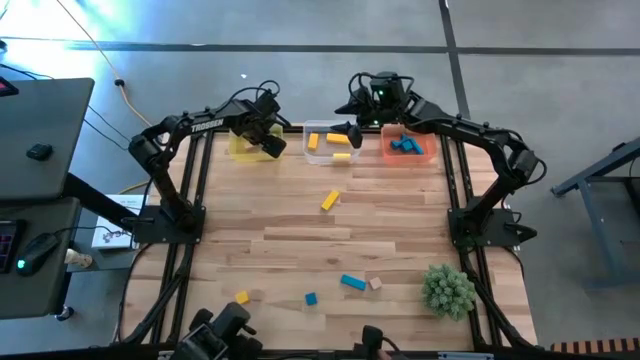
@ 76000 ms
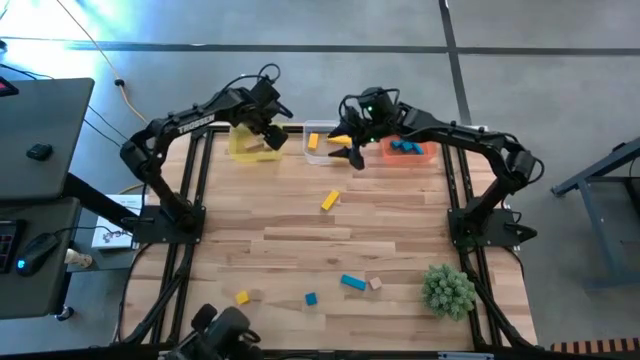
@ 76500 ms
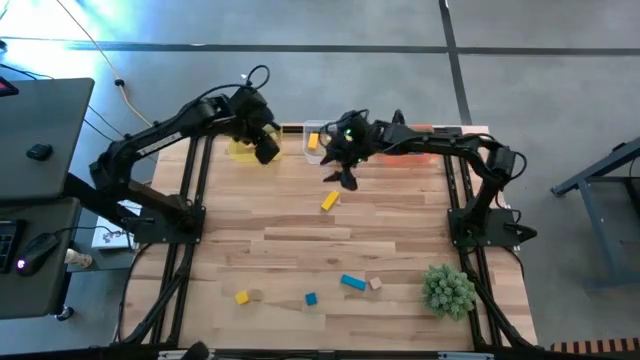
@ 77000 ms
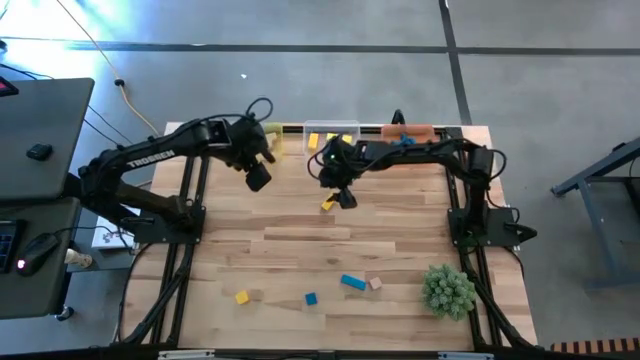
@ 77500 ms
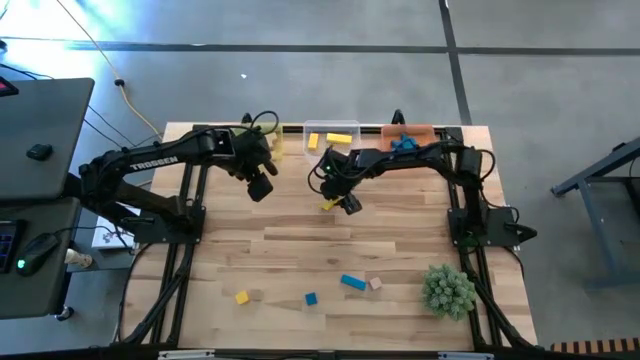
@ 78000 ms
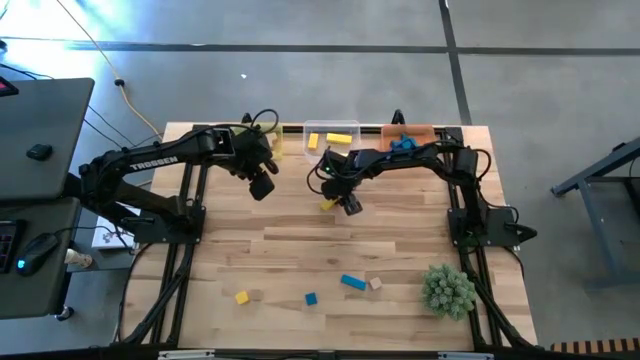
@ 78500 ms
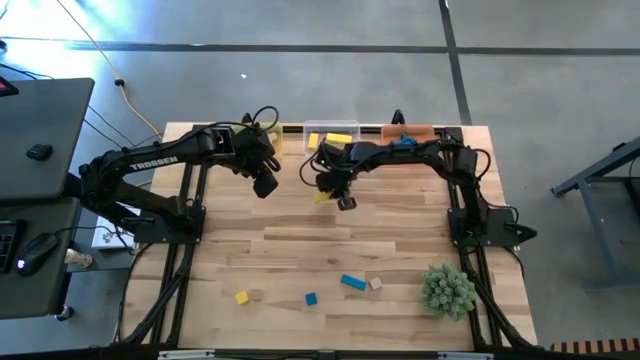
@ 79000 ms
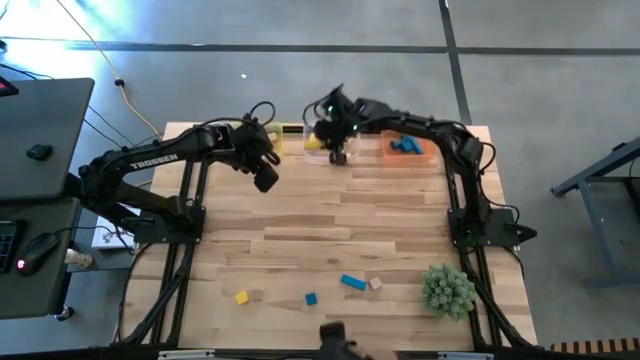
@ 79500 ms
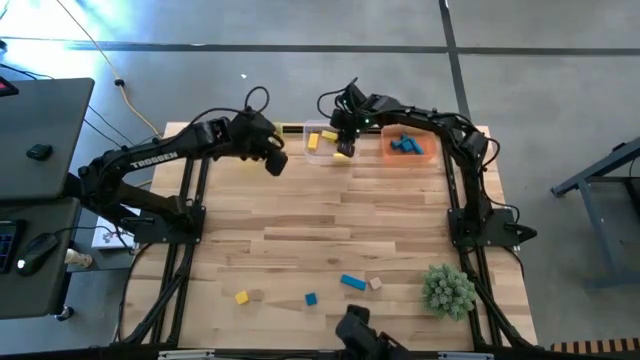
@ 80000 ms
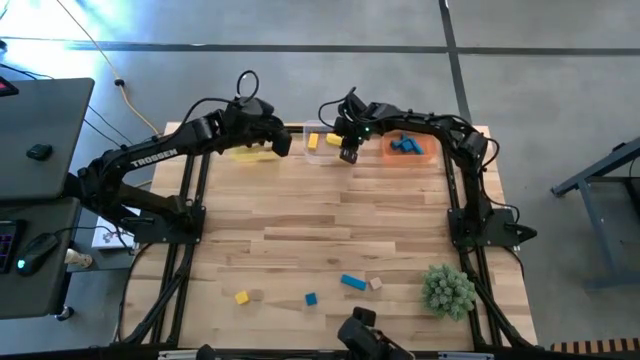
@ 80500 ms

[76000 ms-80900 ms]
Task: Sort & place blocks by color
Put the top yellow block into the transparent bin

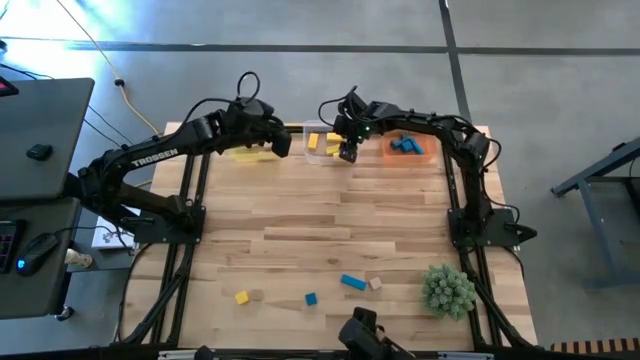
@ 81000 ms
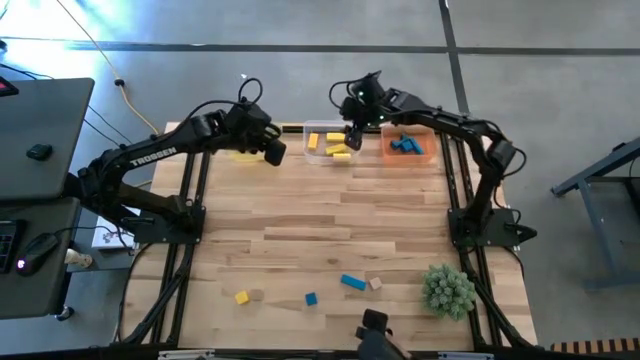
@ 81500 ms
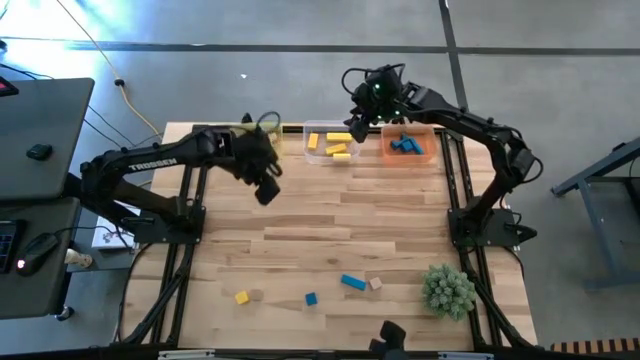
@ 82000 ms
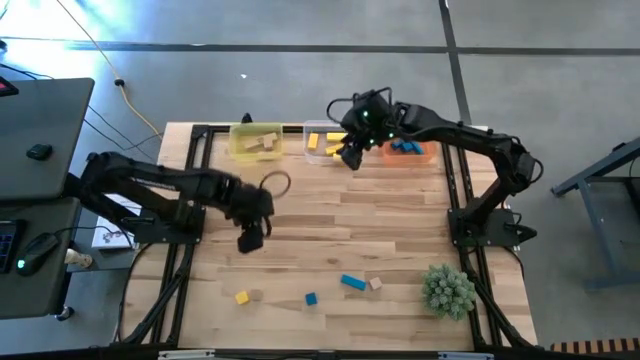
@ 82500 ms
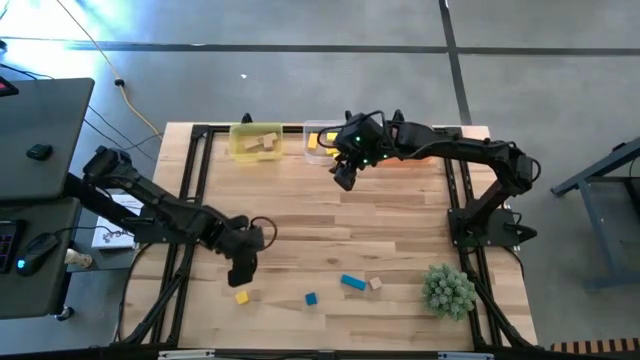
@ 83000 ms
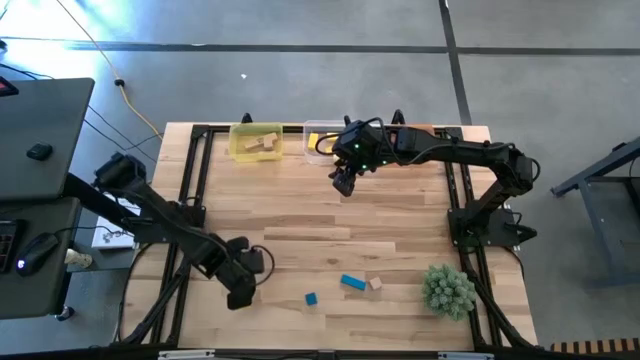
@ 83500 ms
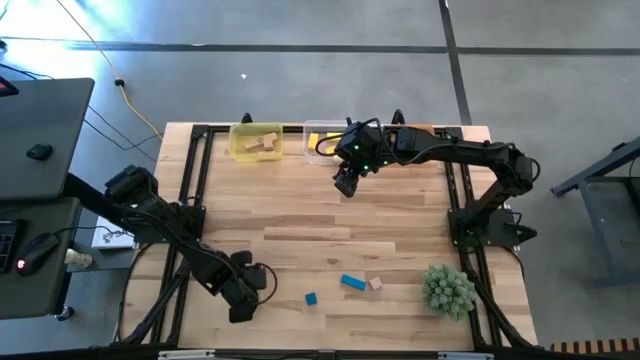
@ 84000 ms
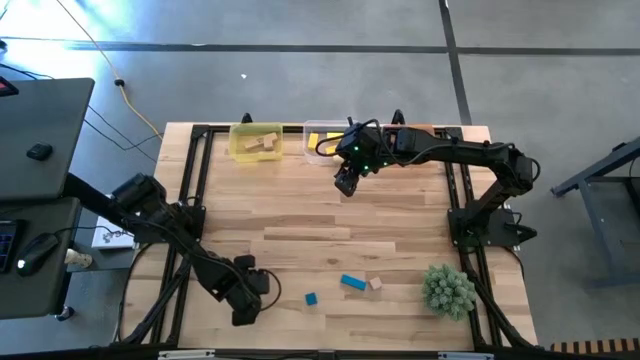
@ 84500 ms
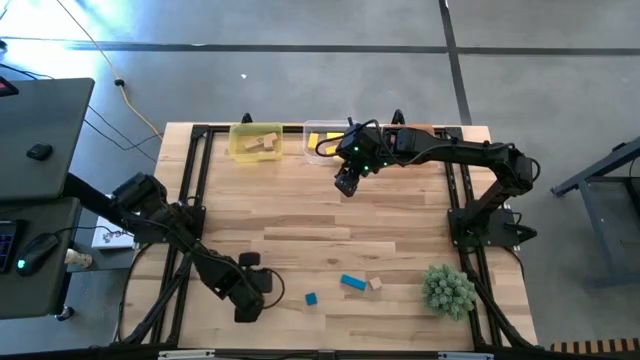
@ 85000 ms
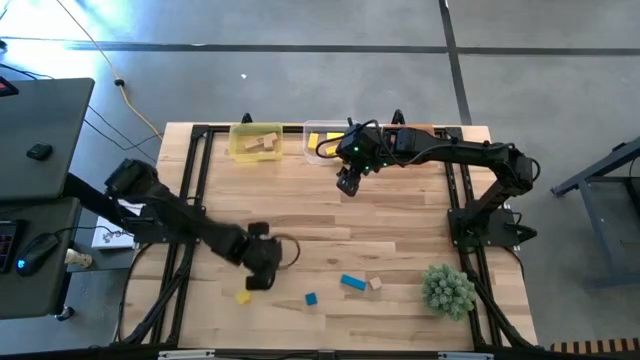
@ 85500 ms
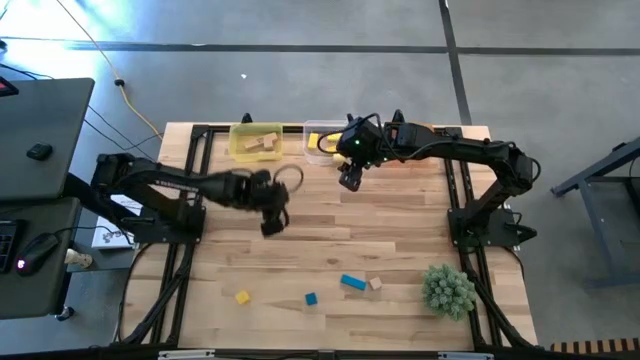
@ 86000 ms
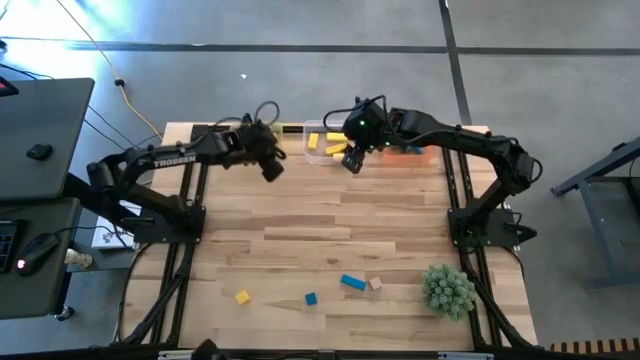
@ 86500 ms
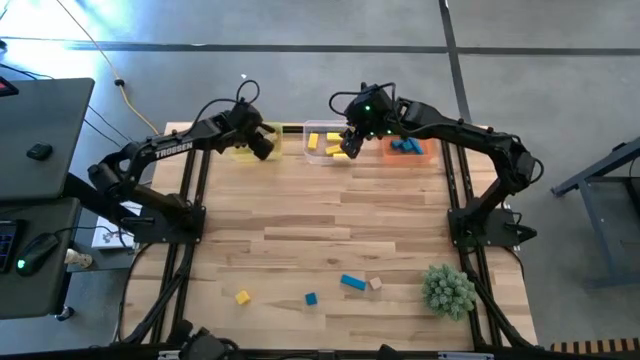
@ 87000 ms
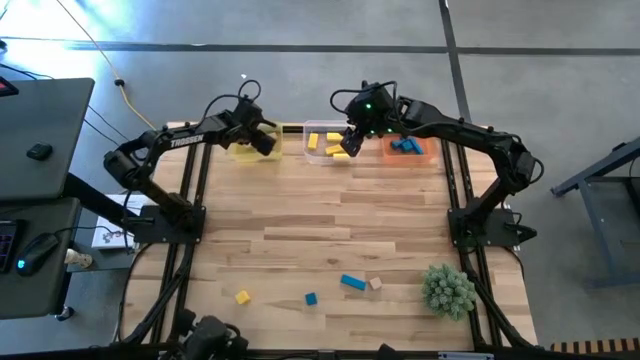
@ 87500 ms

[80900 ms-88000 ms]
Put the left brown block into the yellow bin

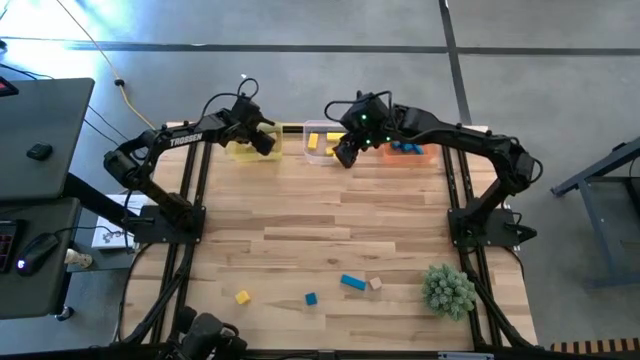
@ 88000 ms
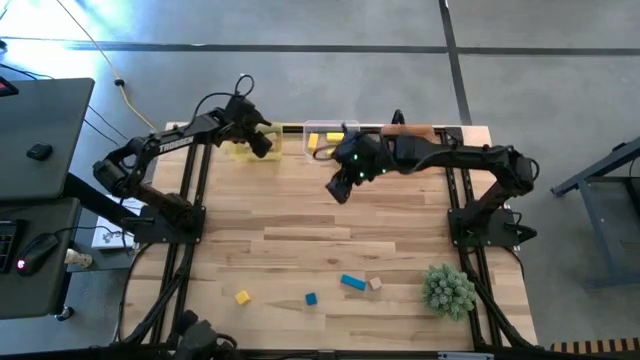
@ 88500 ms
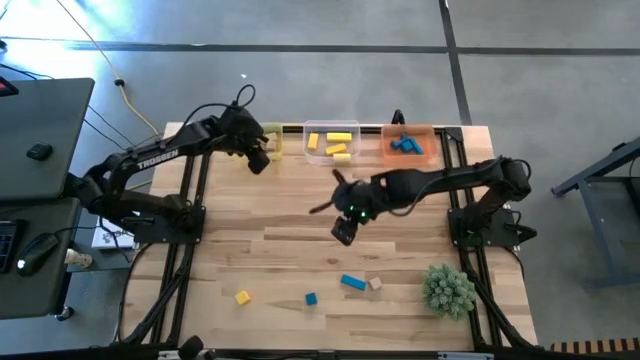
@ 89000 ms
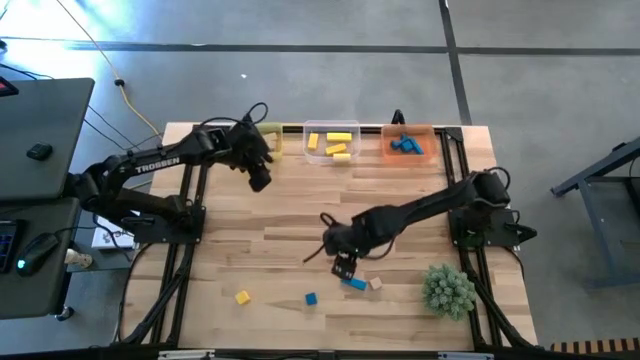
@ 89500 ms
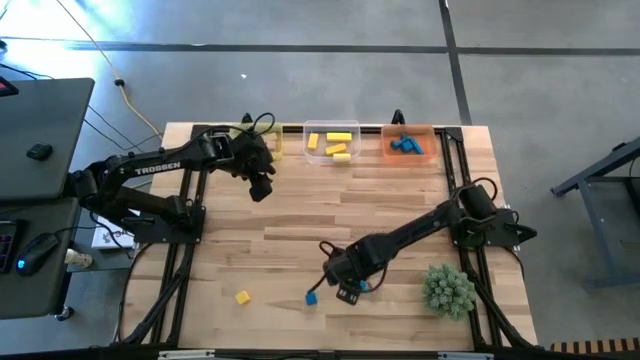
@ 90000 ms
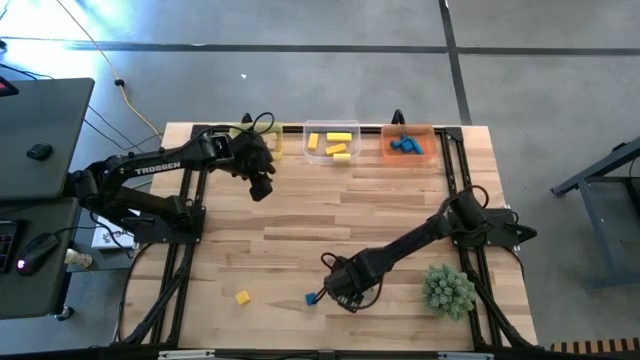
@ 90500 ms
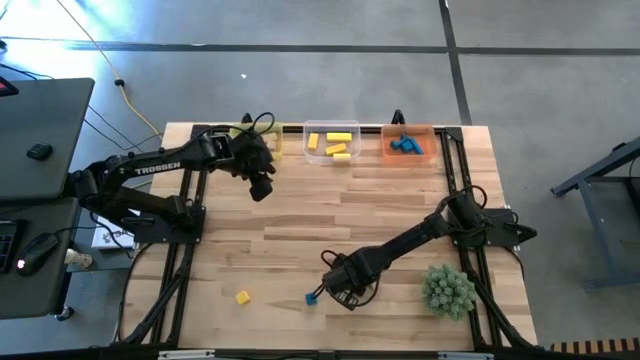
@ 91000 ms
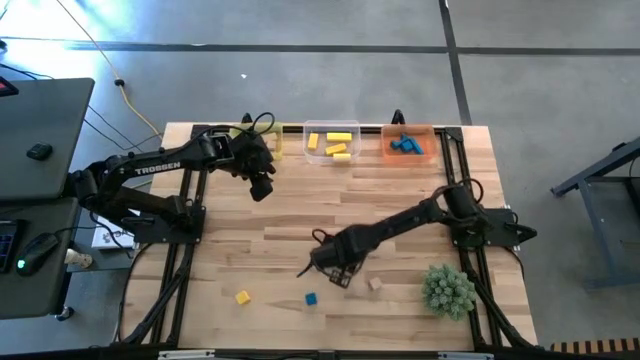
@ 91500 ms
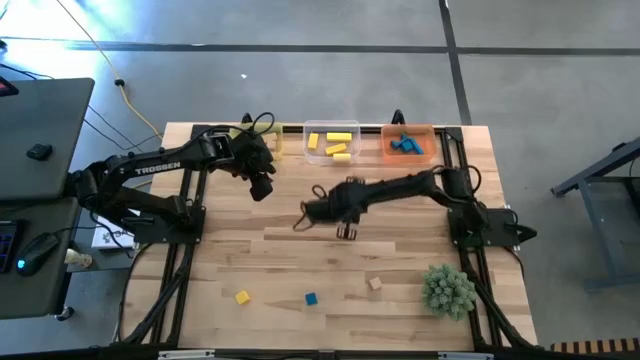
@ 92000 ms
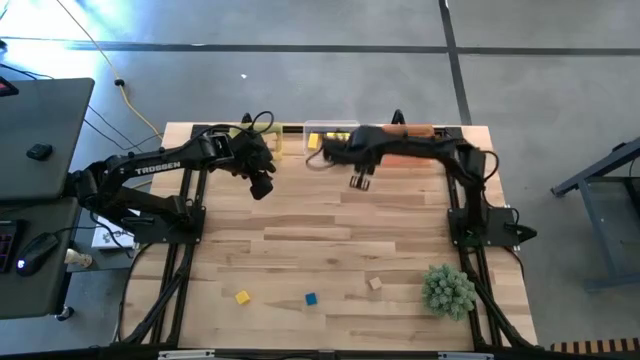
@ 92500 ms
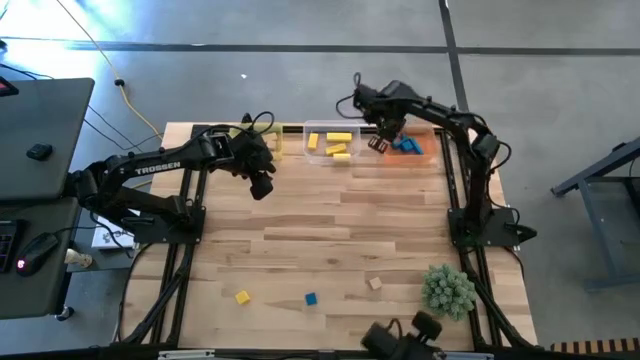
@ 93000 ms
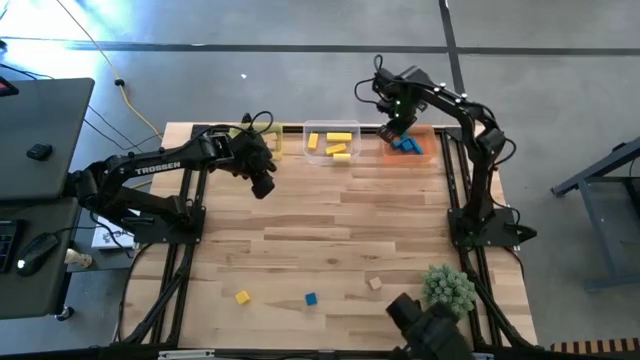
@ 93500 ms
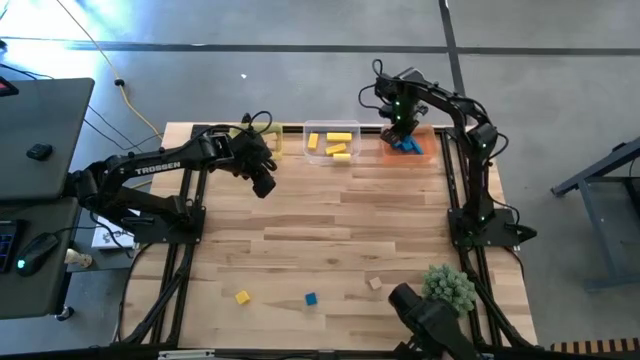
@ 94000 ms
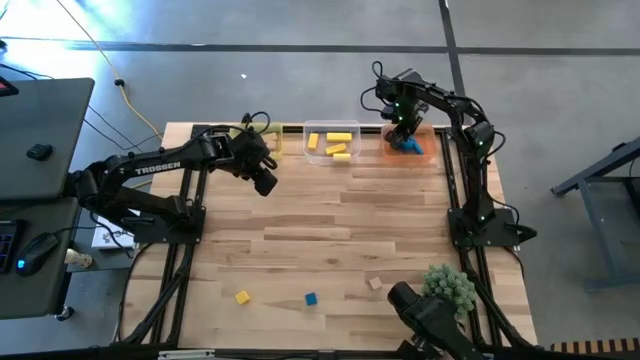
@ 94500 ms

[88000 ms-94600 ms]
Put the right blue block into the orange bin

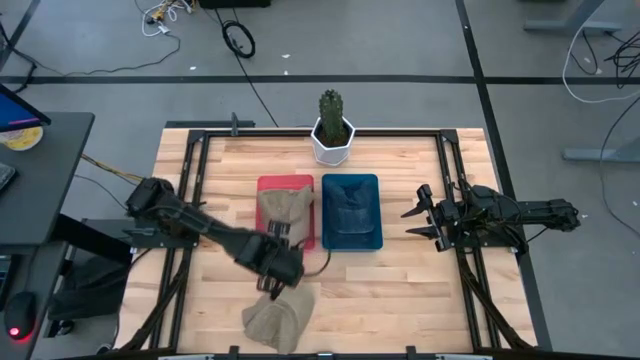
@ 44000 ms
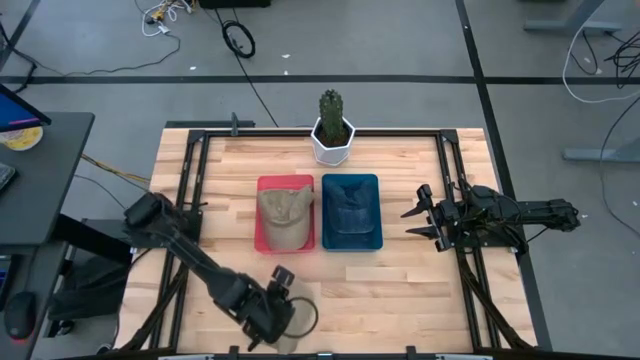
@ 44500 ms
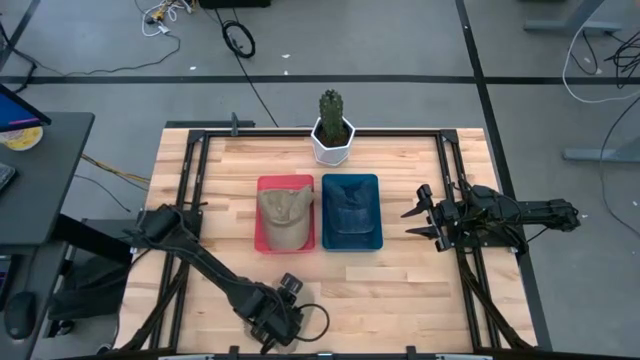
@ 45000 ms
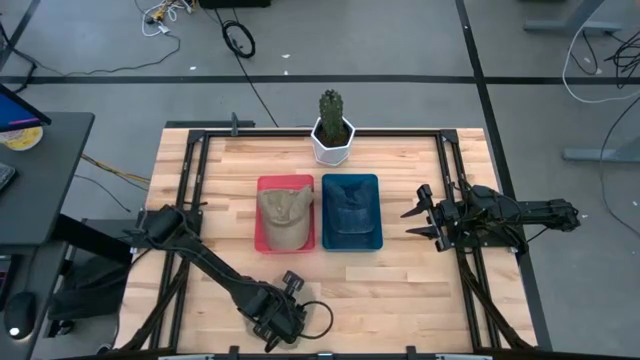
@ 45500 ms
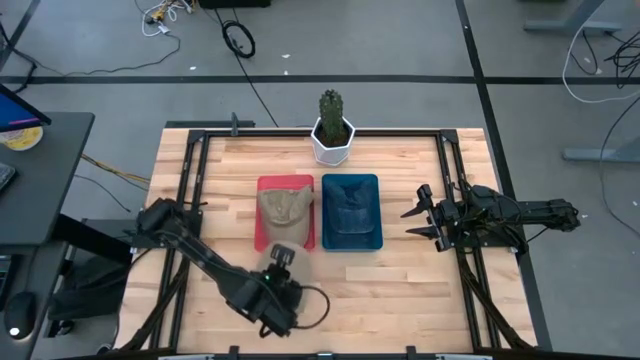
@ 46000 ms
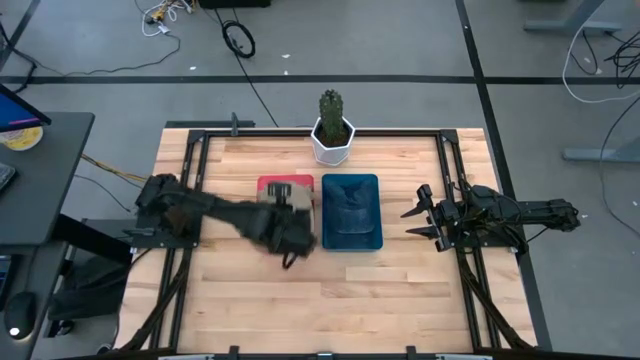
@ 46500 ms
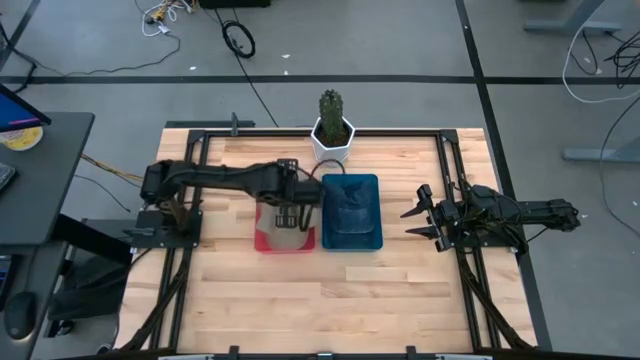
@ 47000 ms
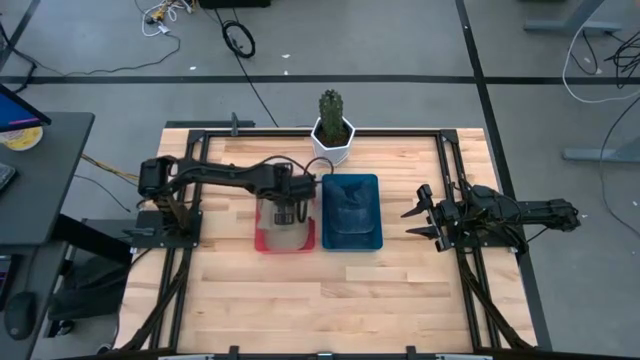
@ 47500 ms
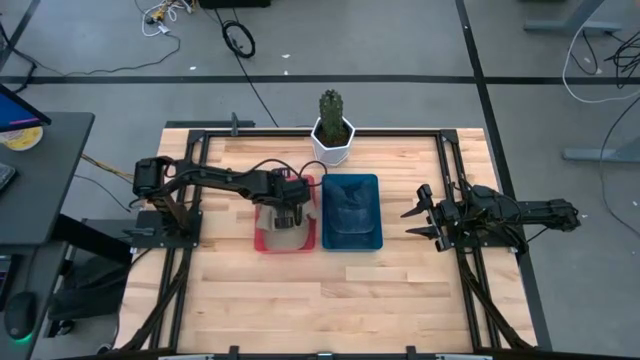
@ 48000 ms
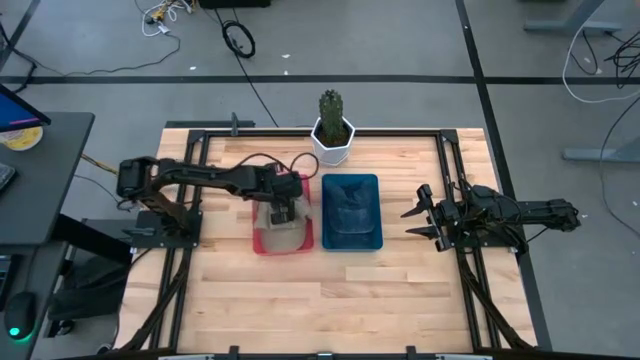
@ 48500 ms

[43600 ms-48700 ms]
Task: Pick & Place hat
Put the brown cap into the pink bin
